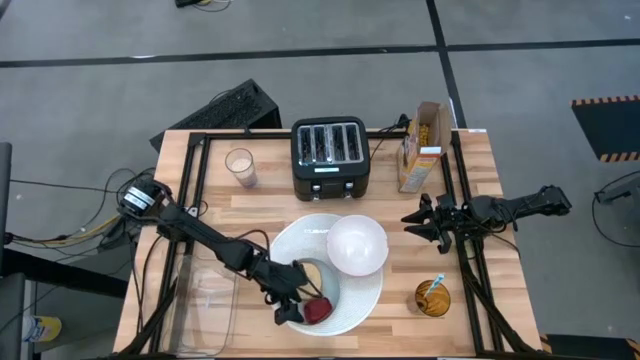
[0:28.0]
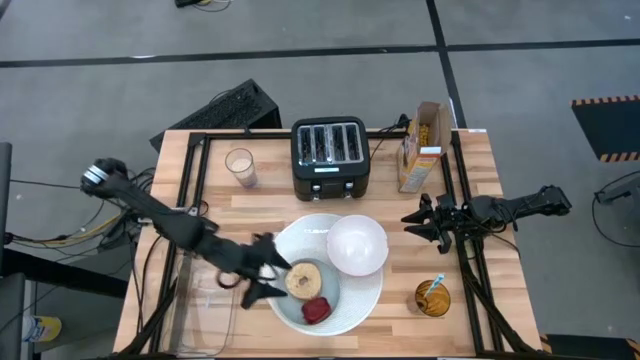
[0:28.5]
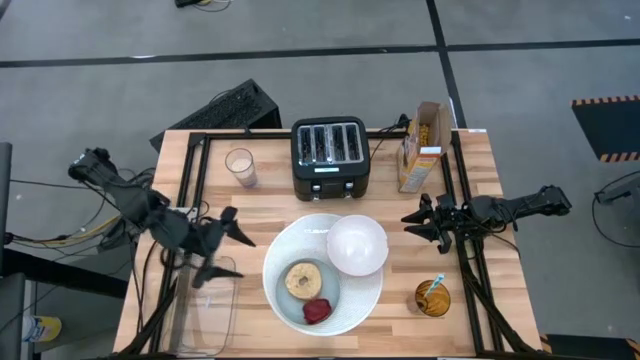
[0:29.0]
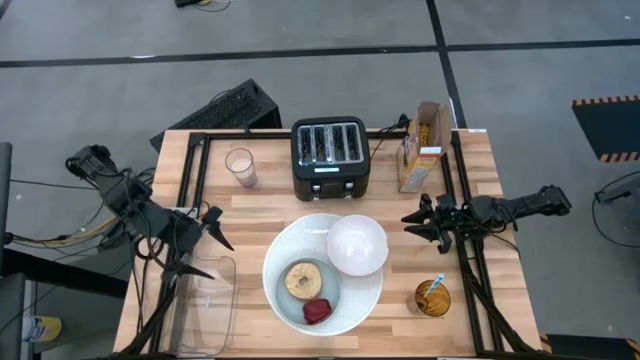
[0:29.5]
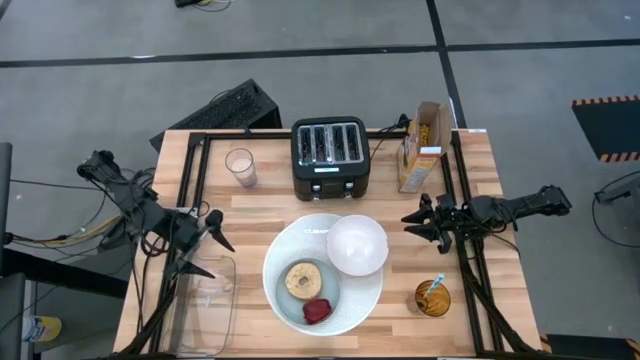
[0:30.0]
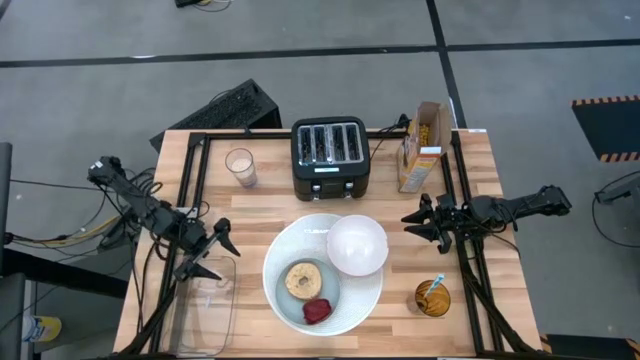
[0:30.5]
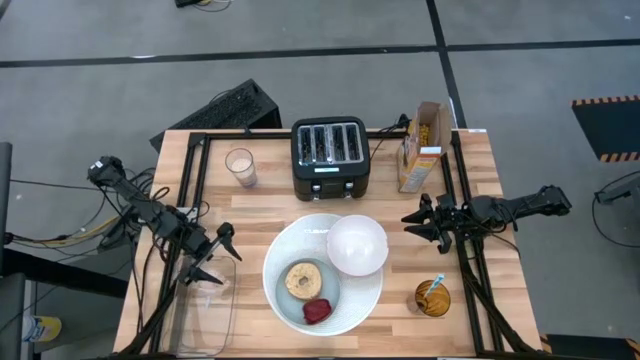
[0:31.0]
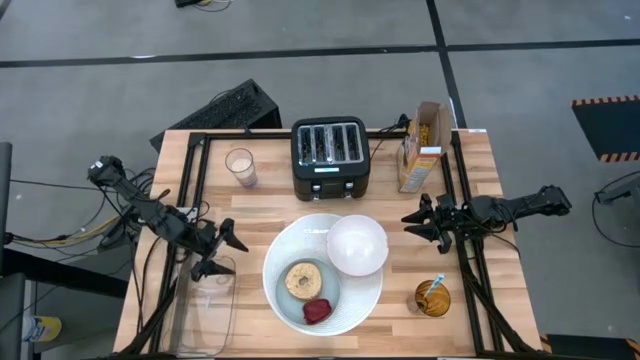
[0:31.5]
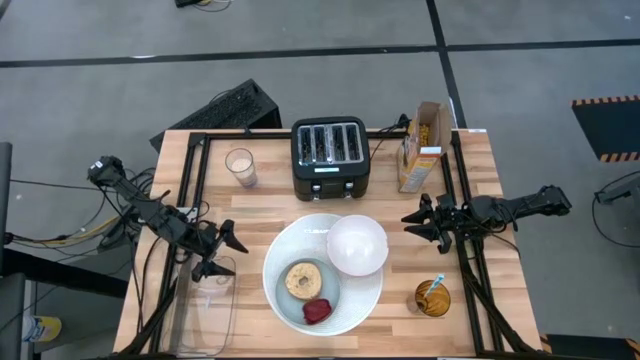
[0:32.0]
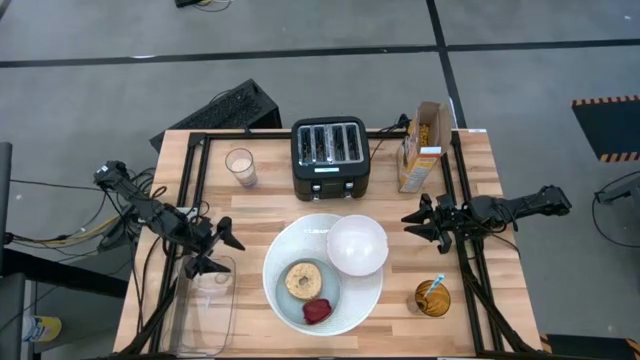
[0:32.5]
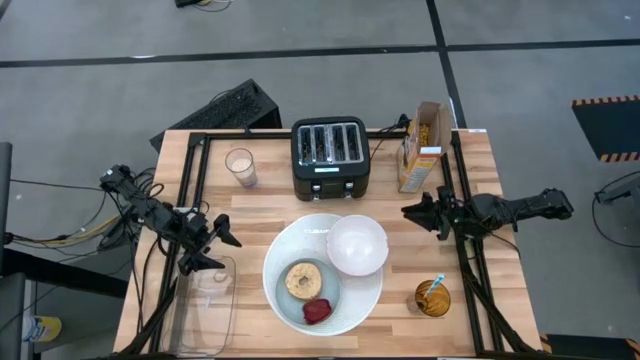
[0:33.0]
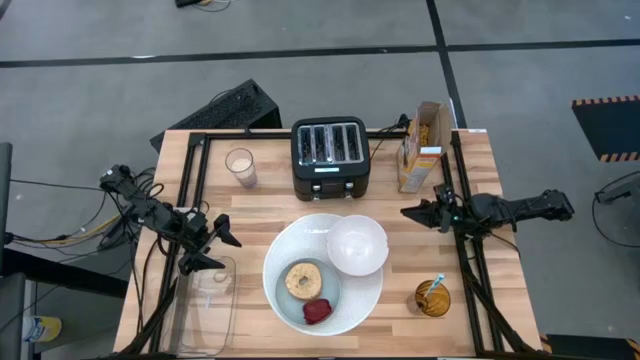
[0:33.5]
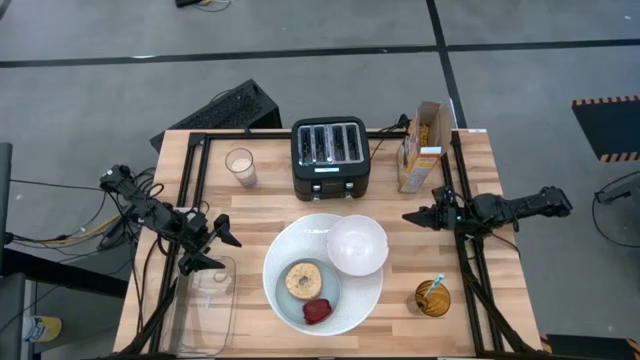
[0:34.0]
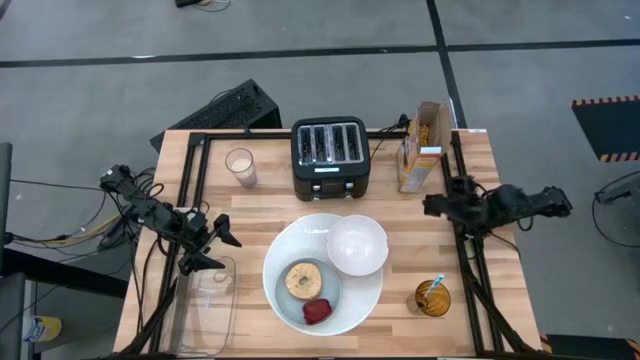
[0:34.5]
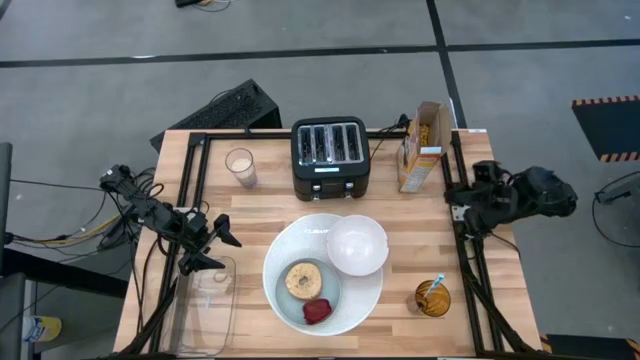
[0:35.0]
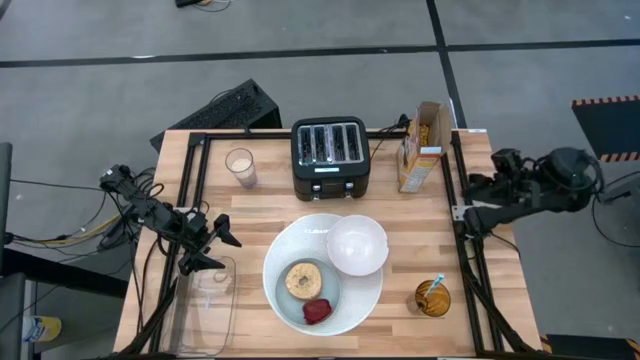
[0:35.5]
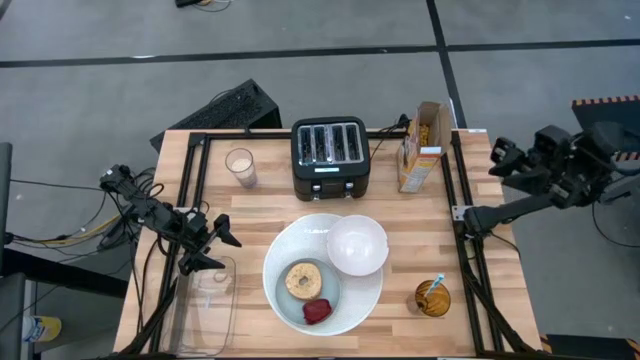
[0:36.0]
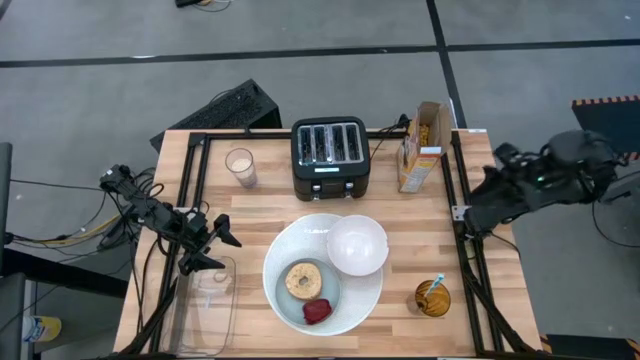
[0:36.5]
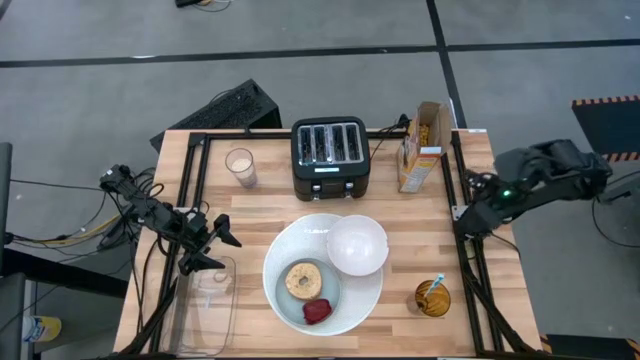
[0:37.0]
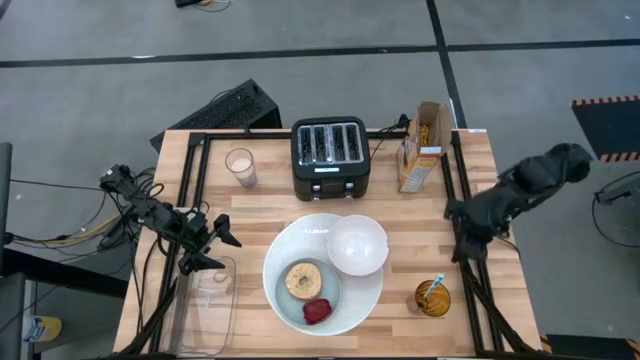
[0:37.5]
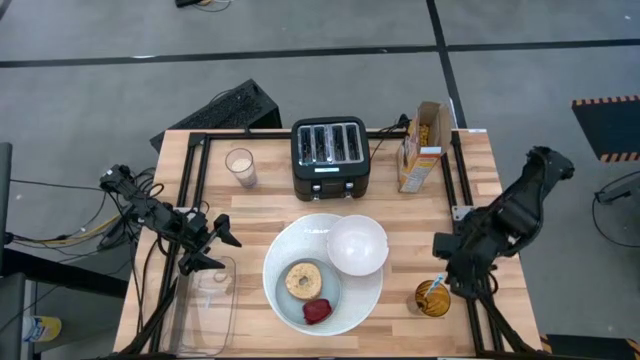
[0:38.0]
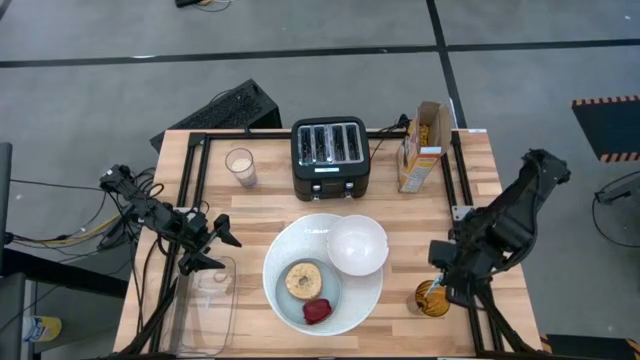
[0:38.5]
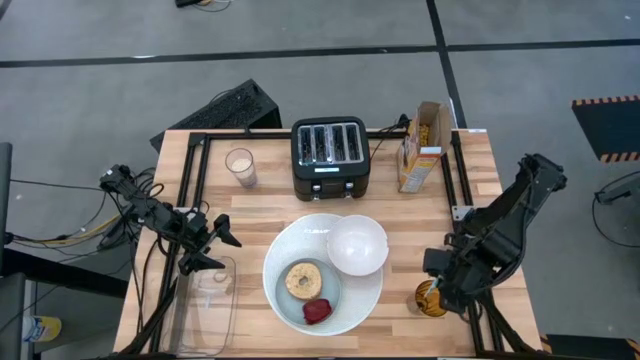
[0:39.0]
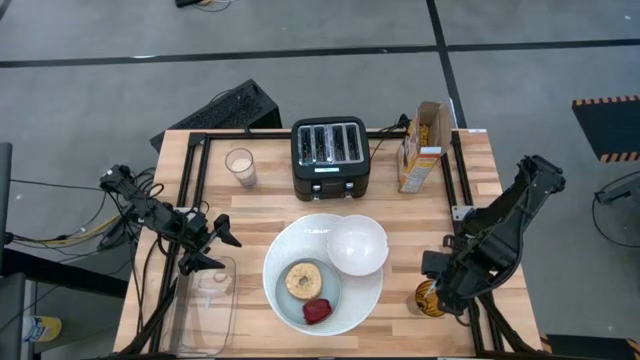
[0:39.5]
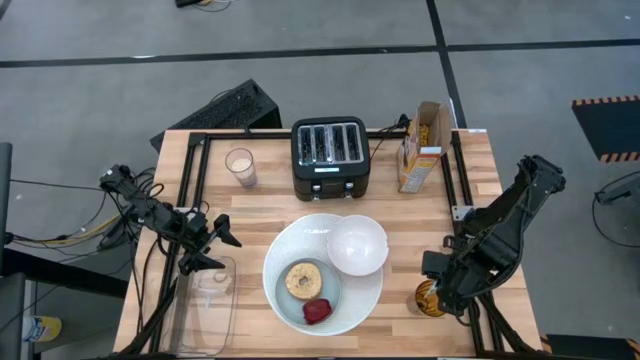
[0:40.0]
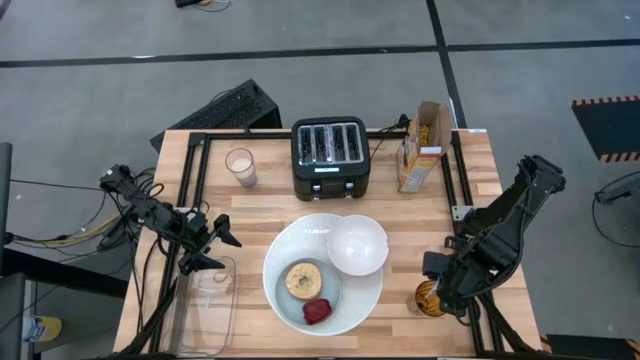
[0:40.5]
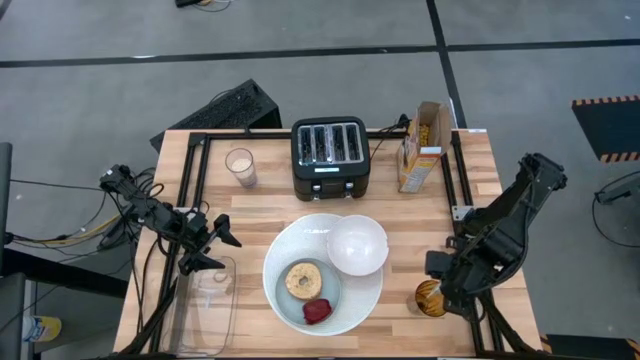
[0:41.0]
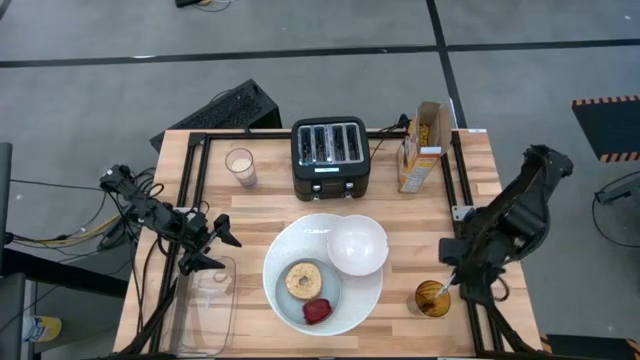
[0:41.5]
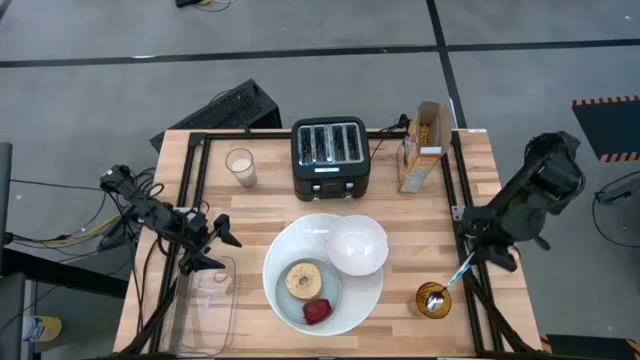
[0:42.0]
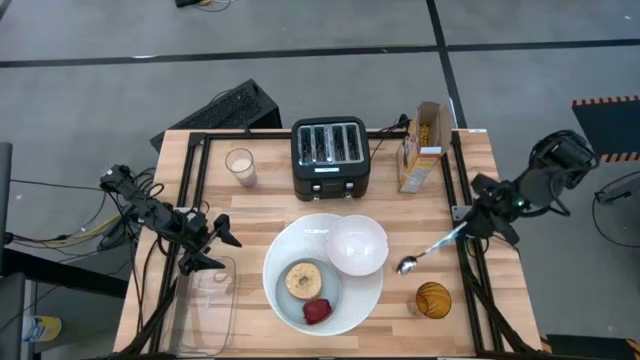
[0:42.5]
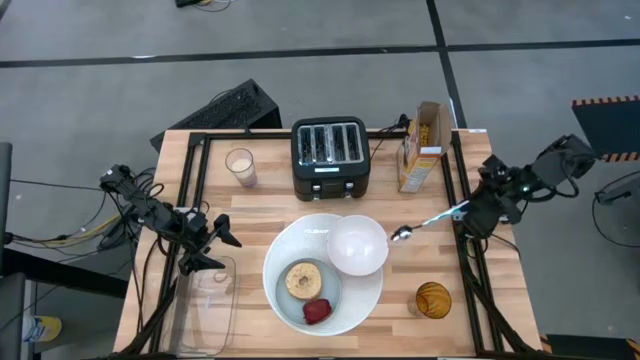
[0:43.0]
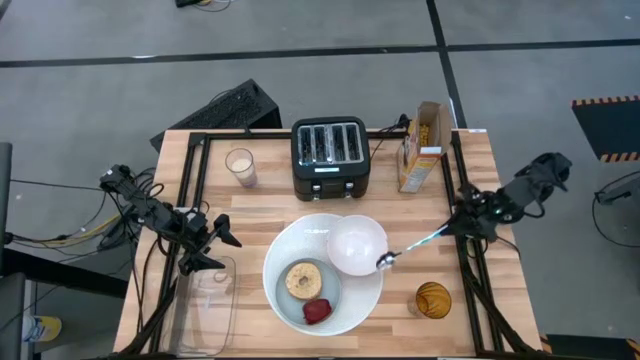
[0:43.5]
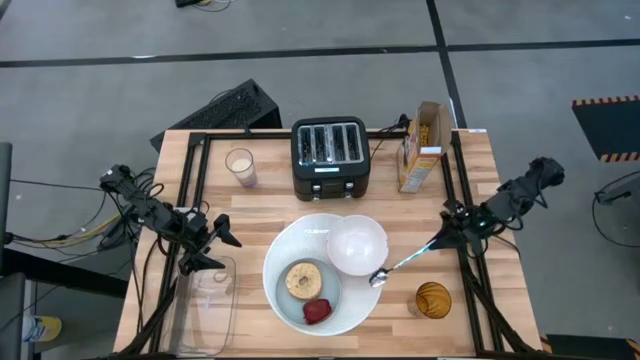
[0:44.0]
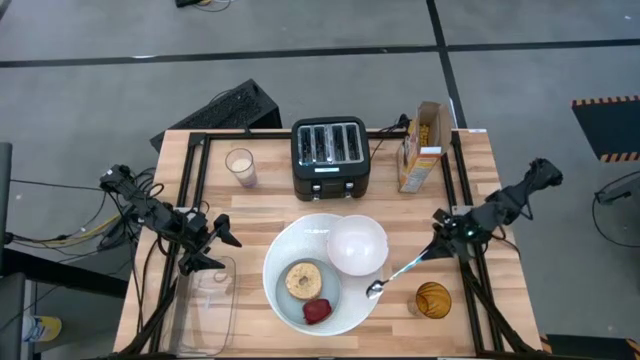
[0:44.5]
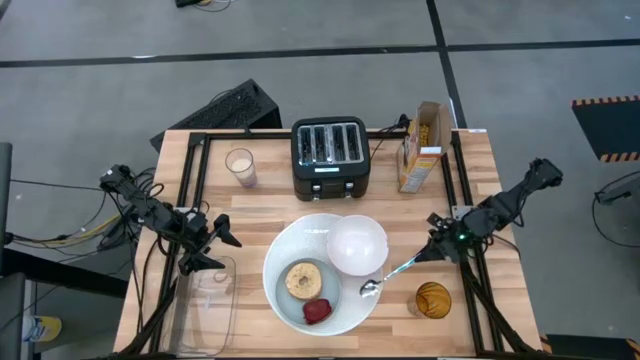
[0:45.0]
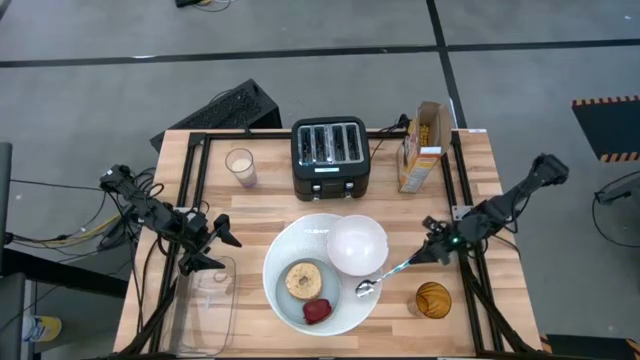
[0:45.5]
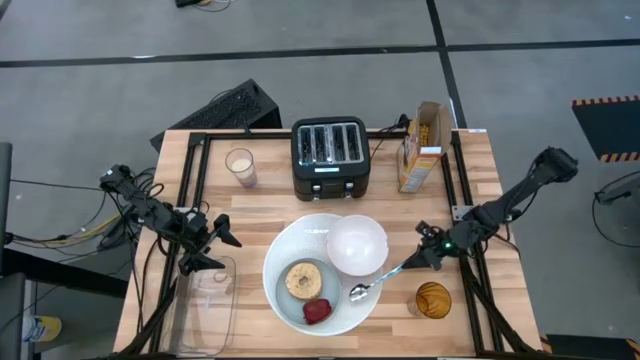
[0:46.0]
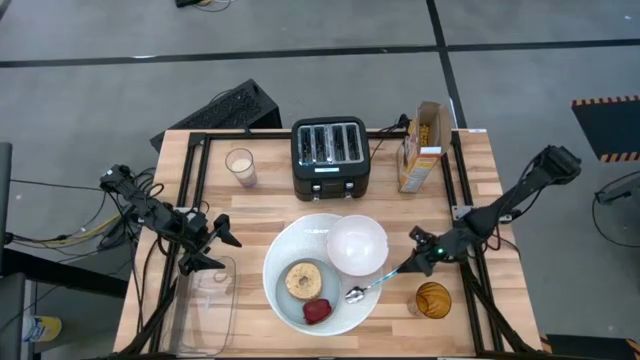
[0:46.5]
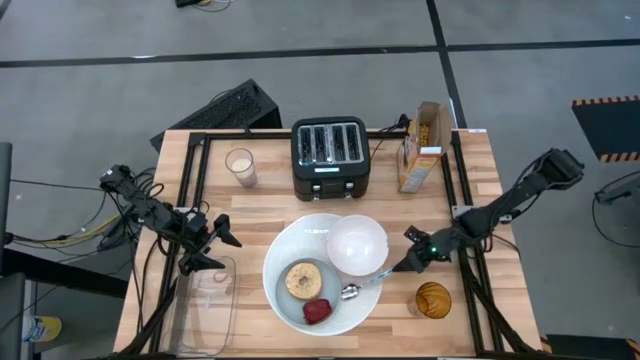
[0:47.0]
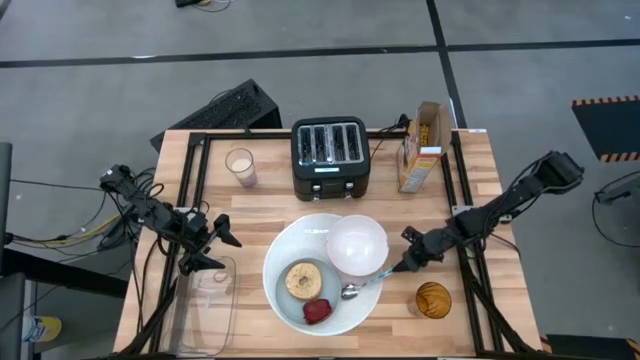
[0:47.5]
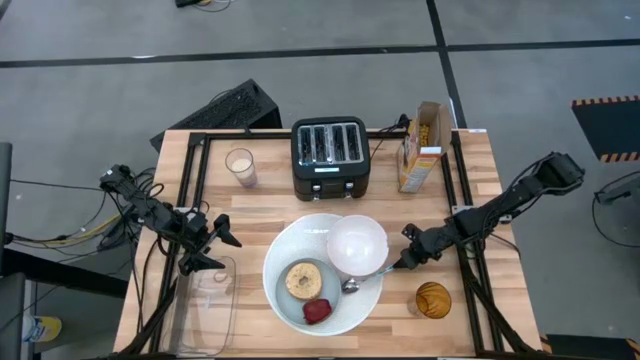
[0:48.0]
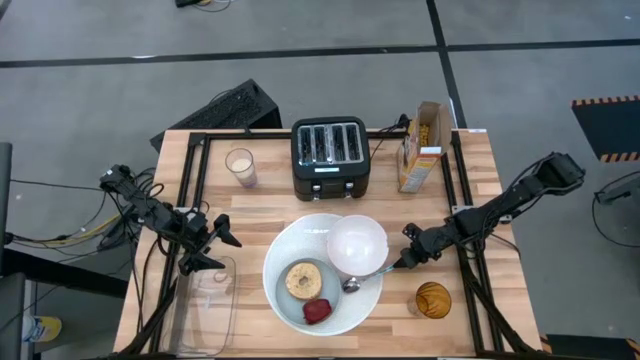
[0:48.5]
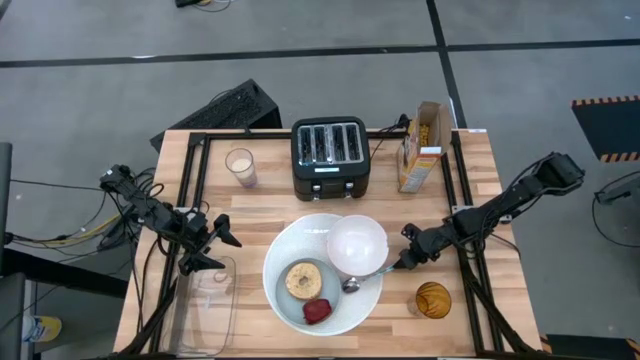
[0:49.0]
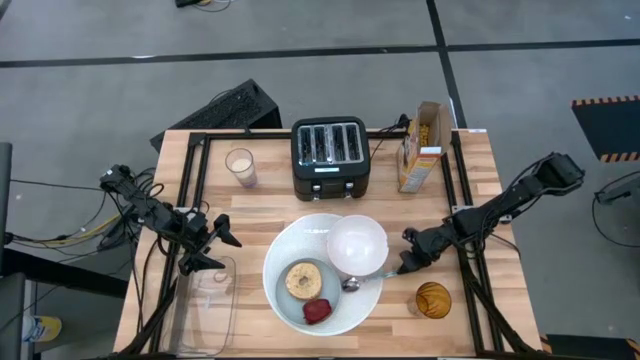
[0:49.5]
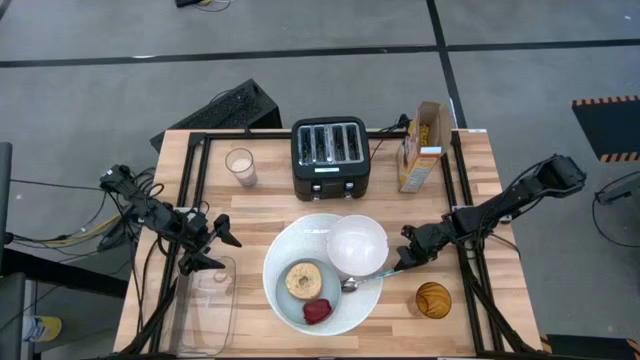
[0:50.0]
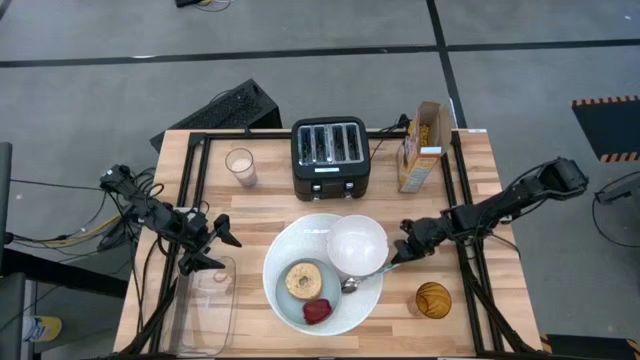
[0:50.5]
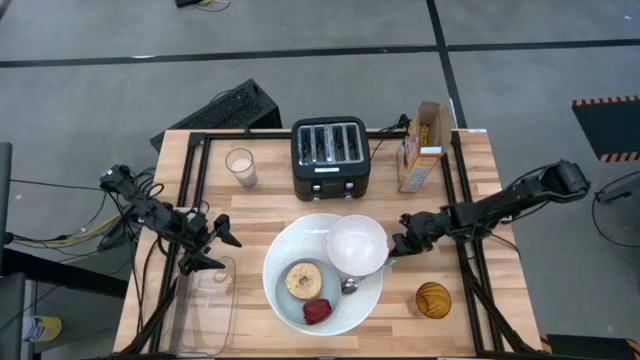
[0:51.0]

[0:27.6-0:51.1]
Task: Arrange a breakfast setting
Put the blue spoon on the white table mat
